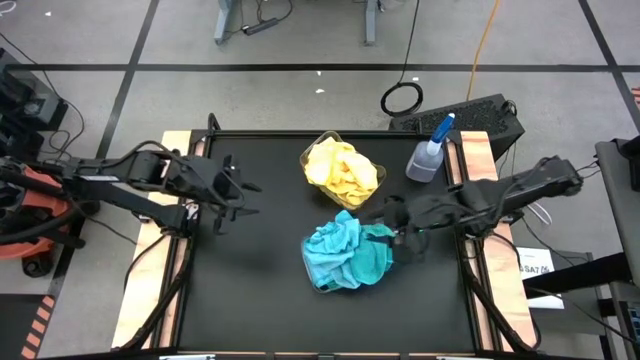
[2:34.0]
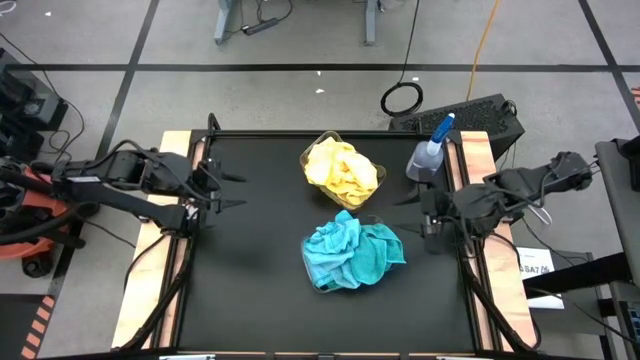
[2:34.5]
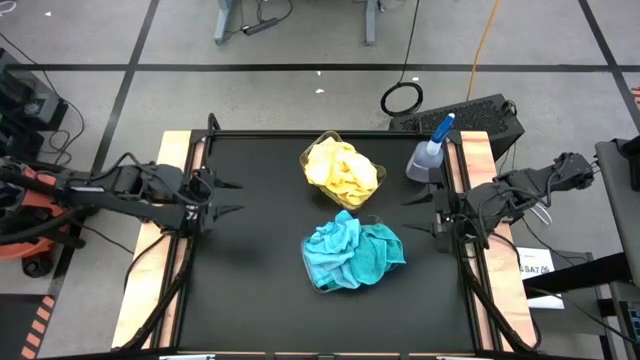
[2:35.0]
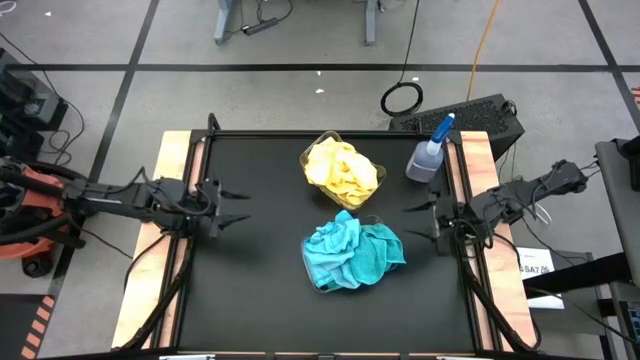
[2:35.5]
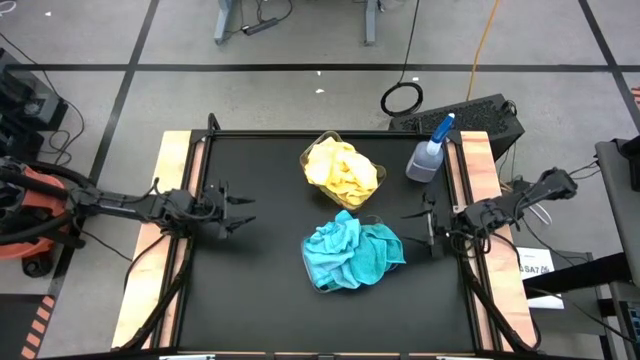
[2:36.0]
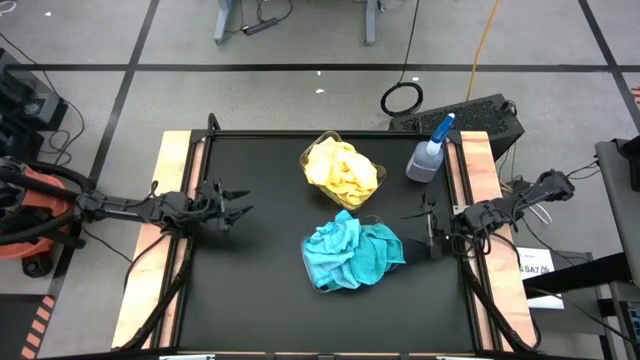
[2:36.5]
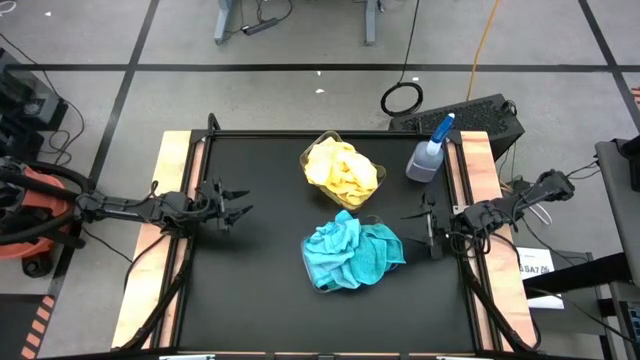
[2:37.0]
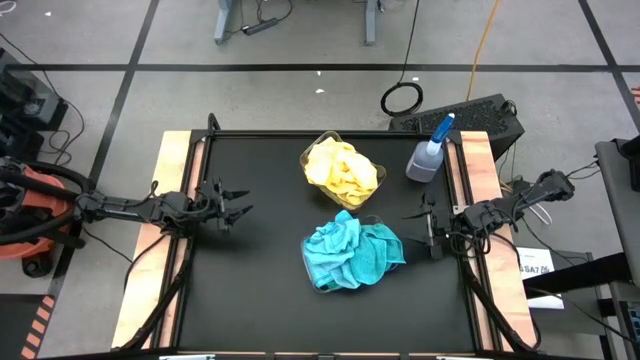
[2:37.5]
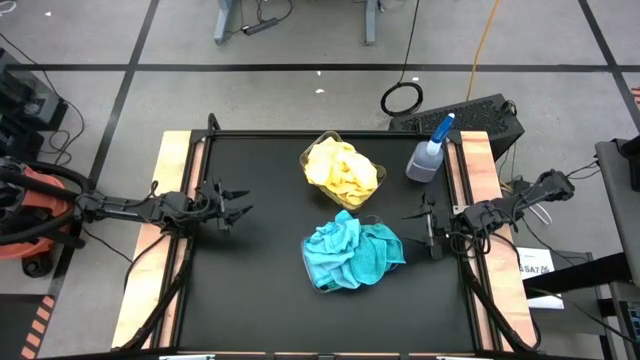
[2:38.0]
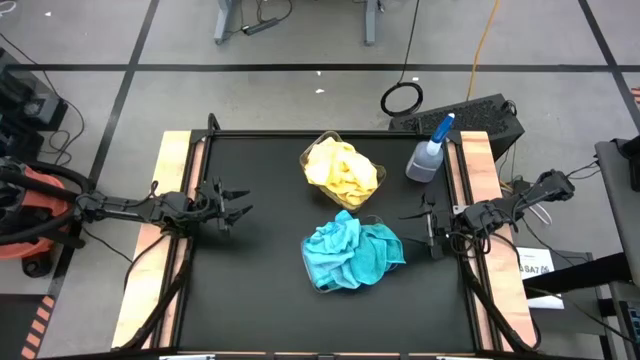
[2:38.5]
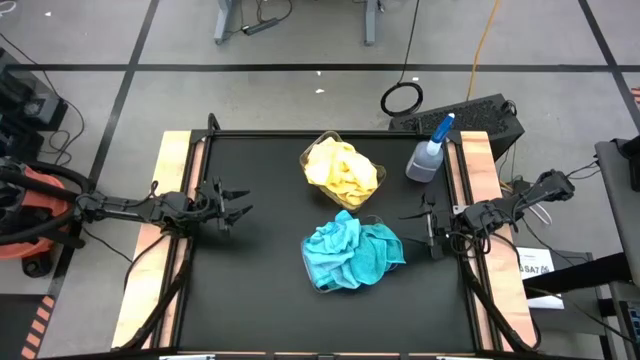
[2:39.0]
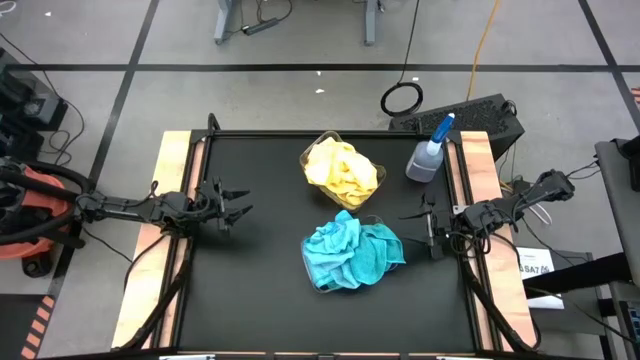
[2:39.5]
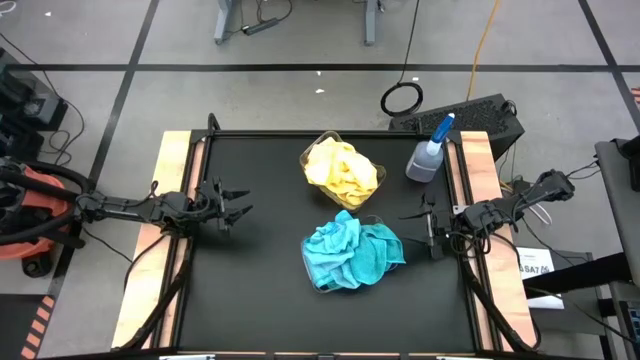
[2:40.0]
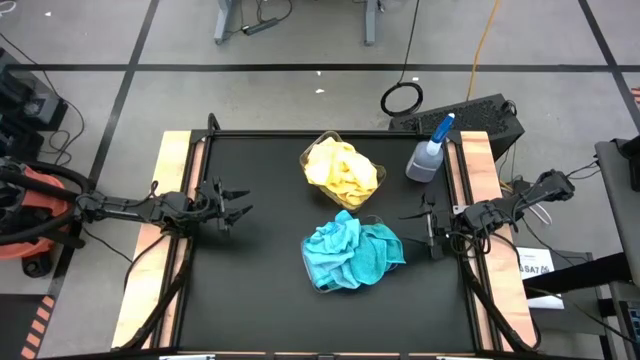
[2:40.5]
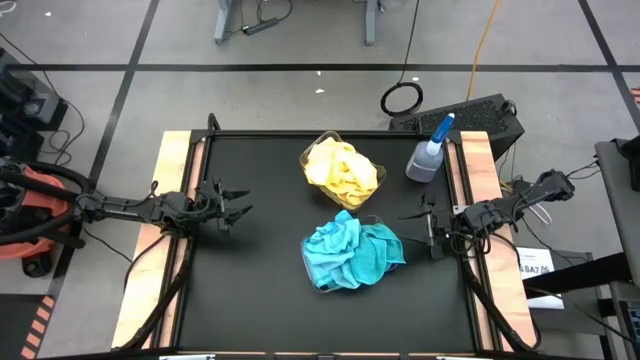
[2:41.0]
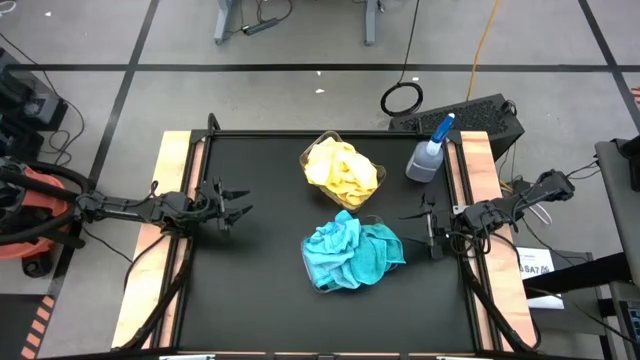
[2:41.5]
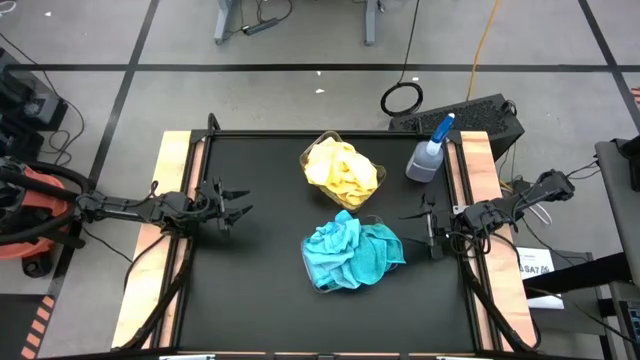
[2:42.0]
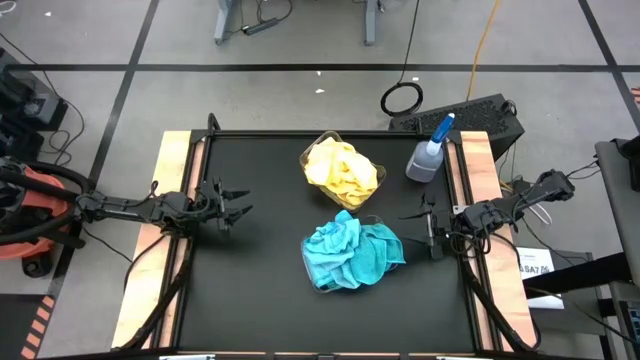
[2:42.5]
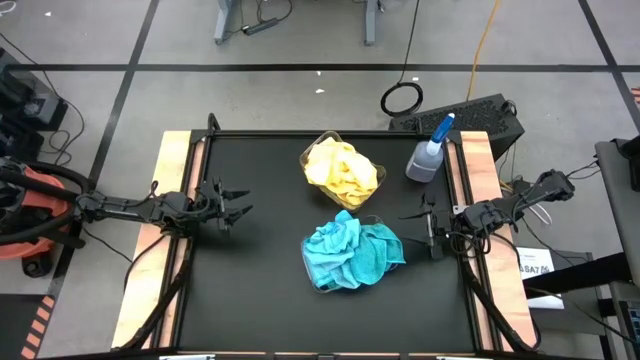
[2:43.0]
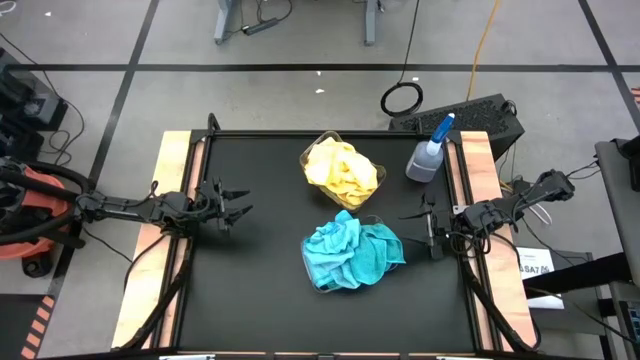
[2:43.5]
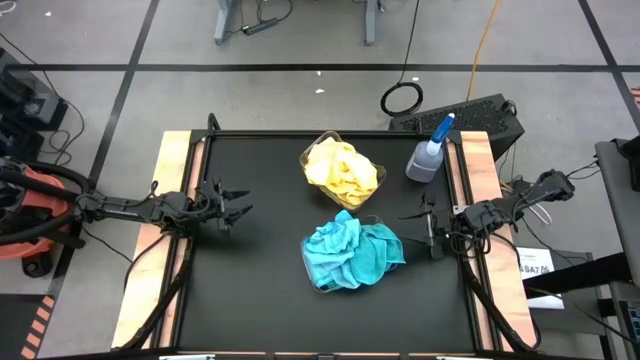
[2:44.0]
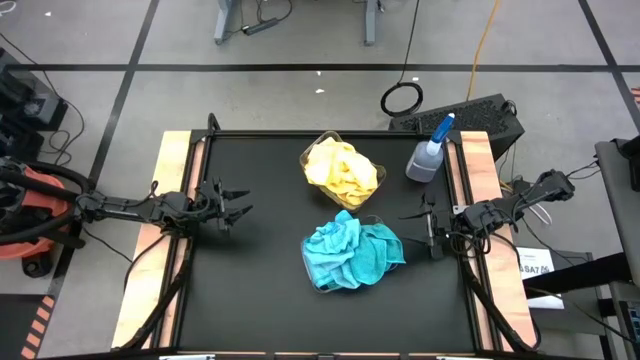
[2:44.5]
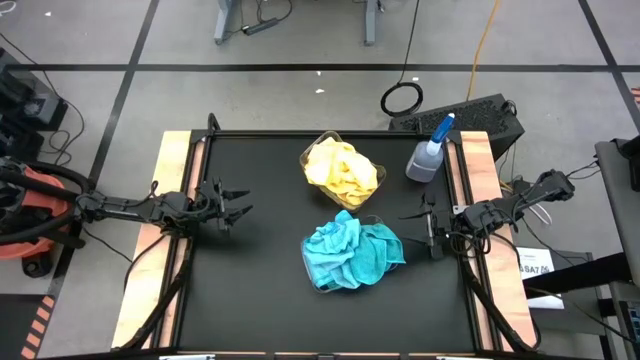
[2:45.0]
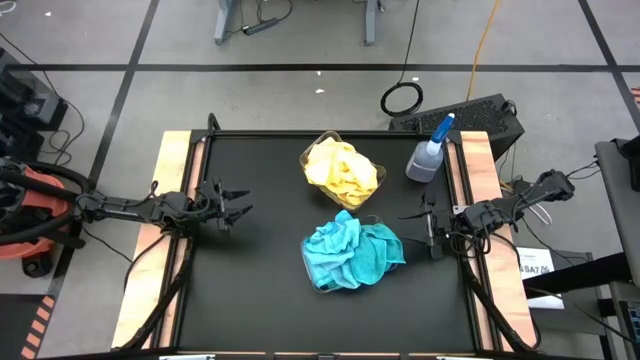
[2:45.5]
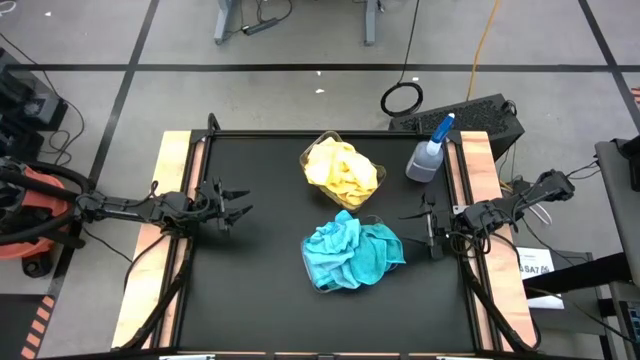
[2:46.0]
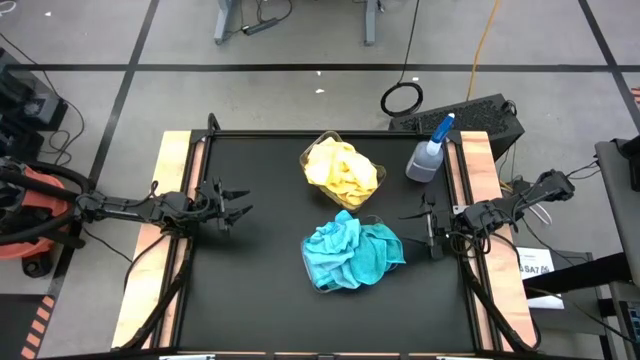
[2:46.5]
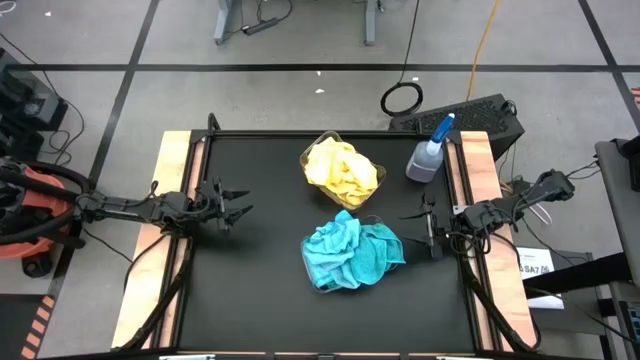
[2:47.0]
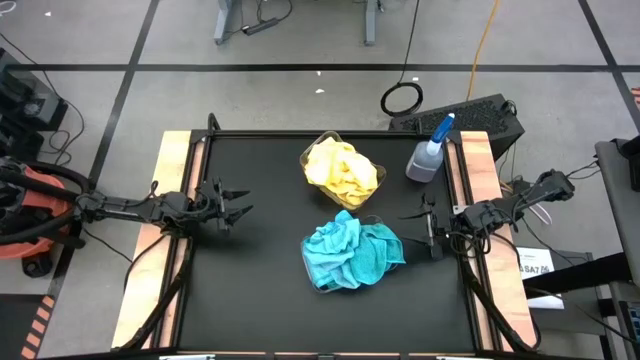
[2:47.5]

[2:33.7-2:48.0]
Task: Sort microfiber towel by color & place in baskets
Return to Home Position

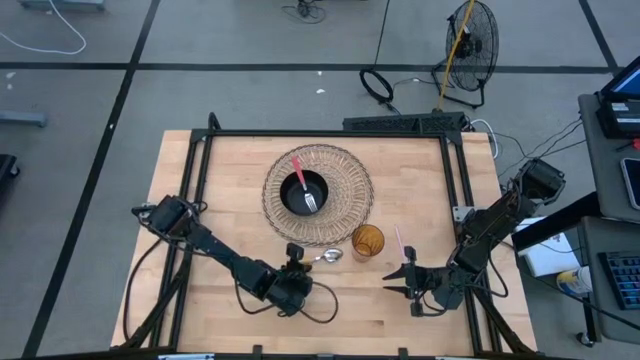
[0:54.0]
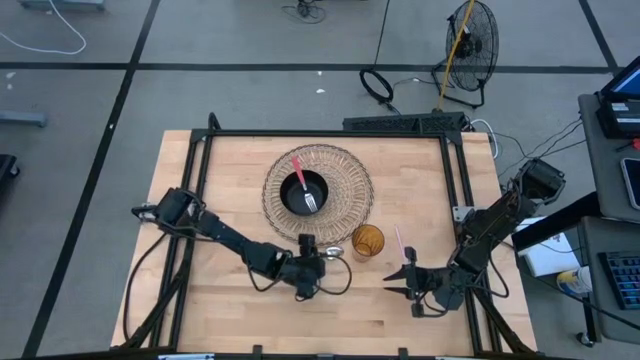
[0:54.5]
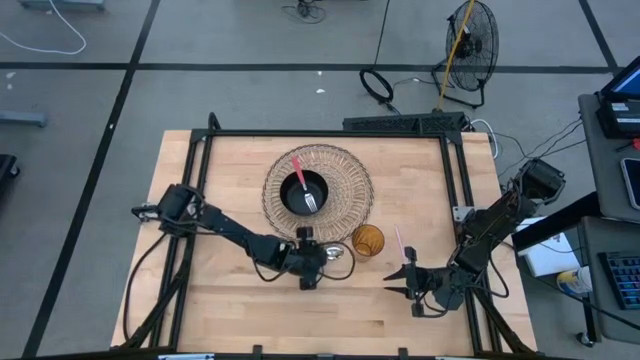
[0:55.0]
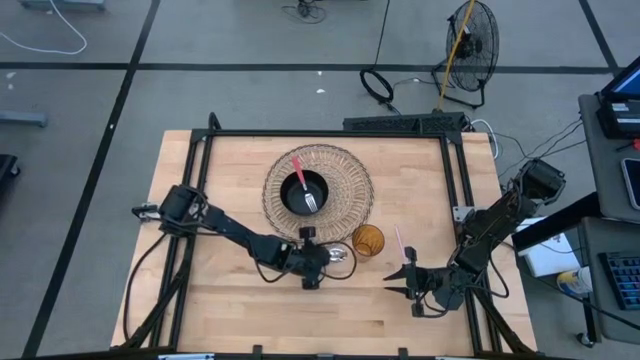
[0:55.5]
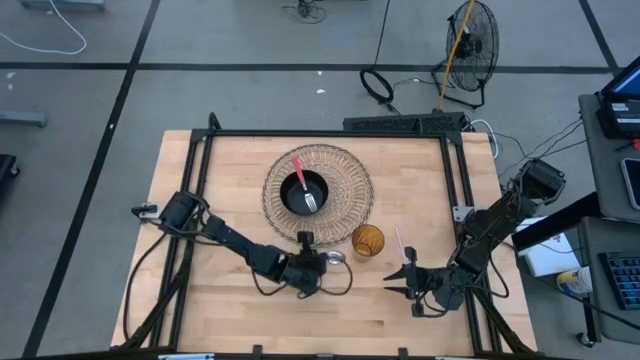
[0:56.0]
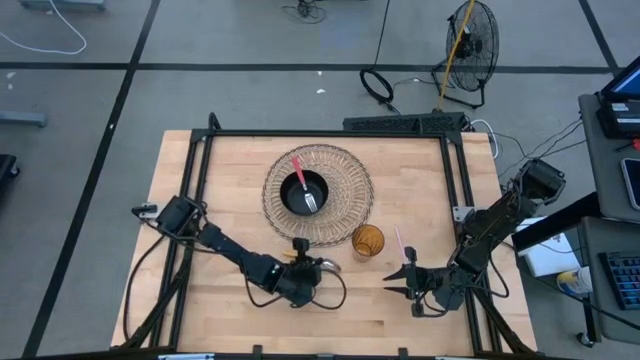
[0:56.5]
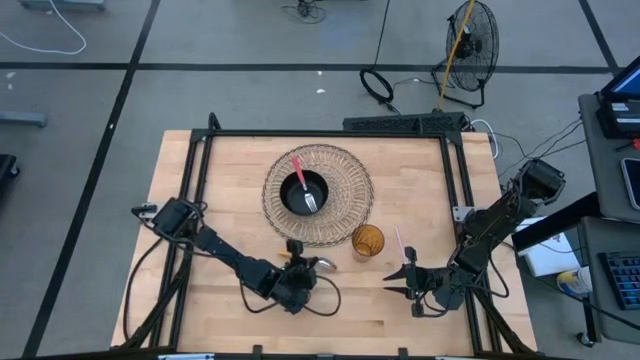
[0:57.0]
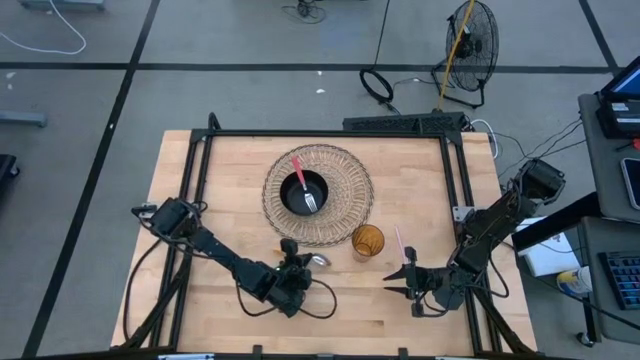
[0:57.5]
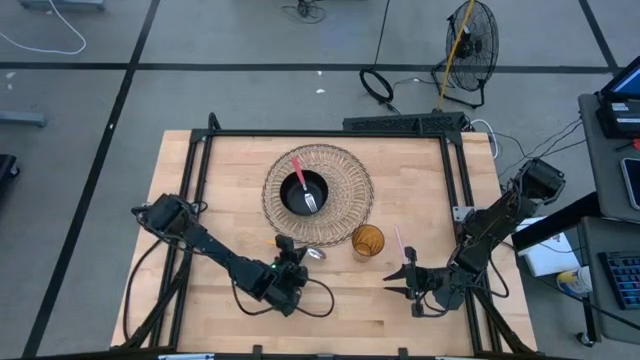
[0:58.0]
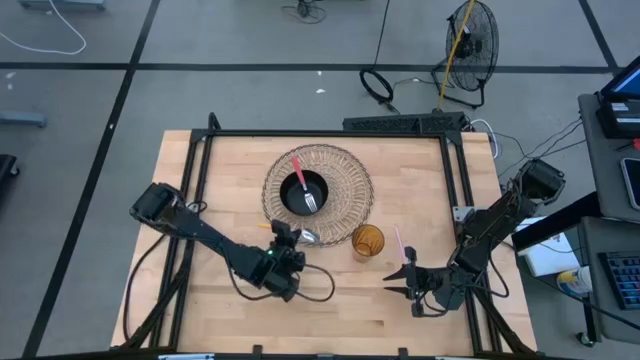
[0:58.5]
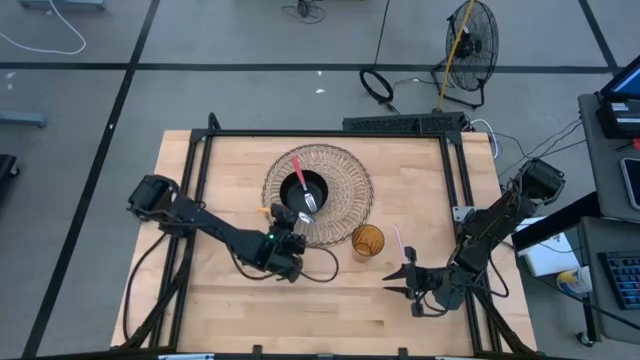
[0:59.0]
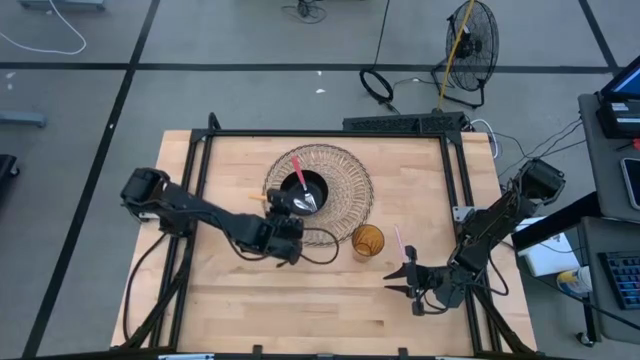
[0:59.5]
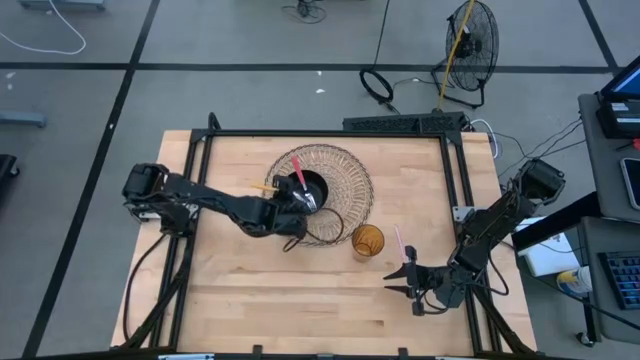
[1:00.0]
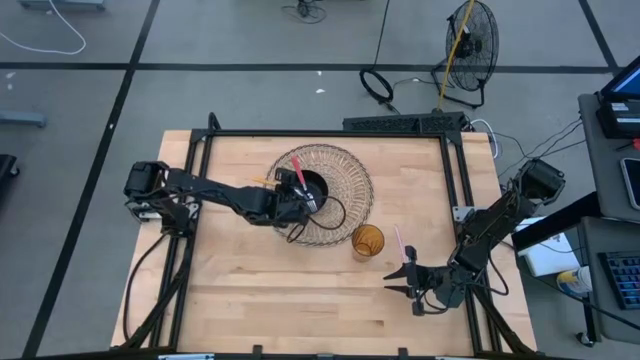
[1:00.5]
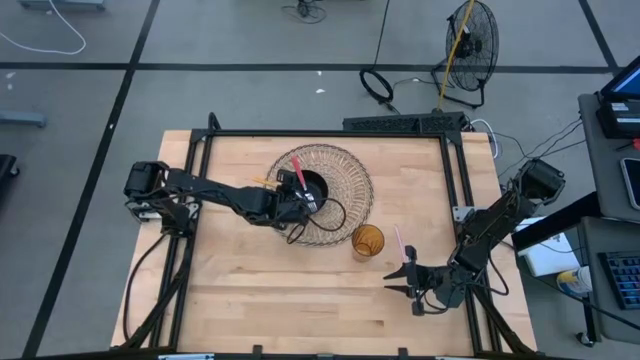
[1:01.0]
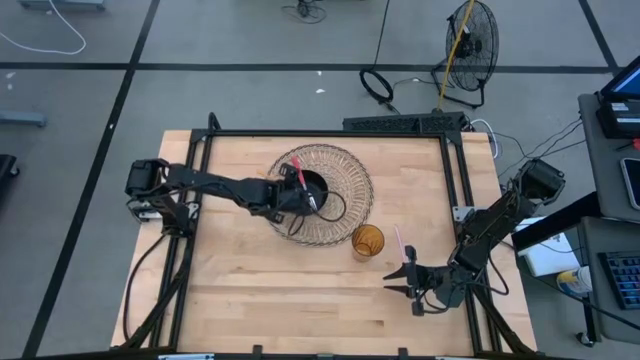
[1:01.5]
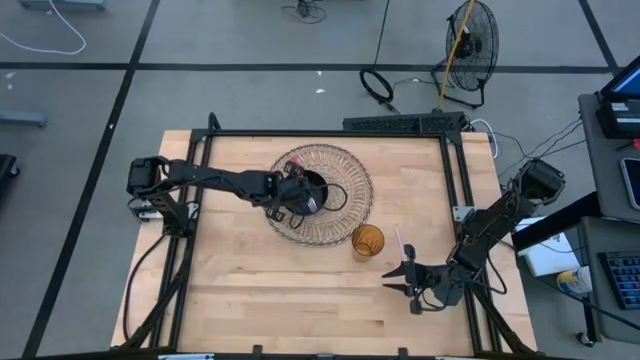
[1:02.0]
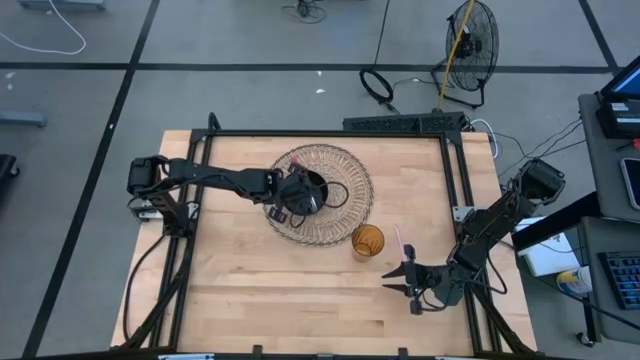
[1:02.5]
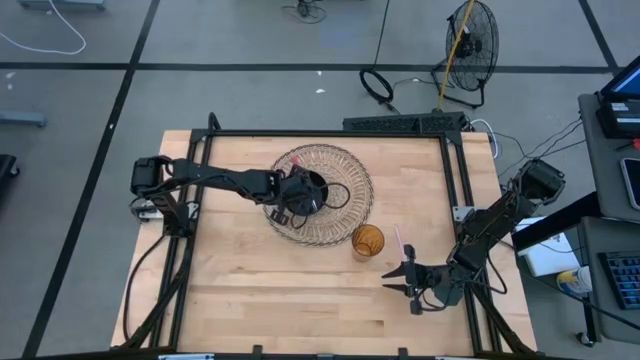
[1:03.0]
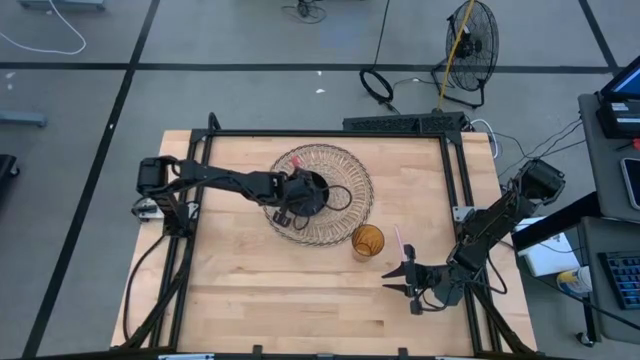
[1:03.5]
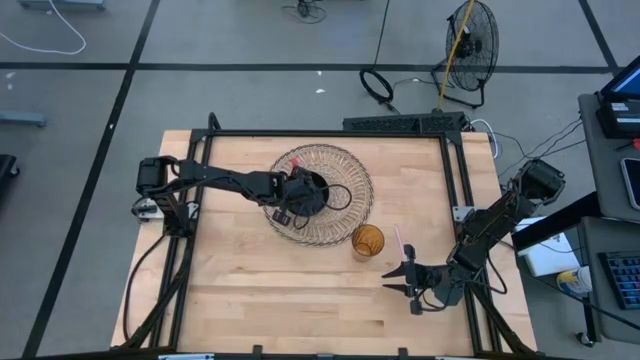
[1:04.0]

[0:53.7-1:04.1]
Task: Pick & Place Utensil
Put the yellow spoon into the black bowl on the woven mat
